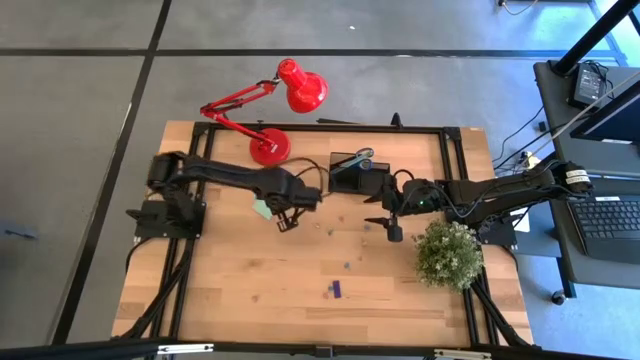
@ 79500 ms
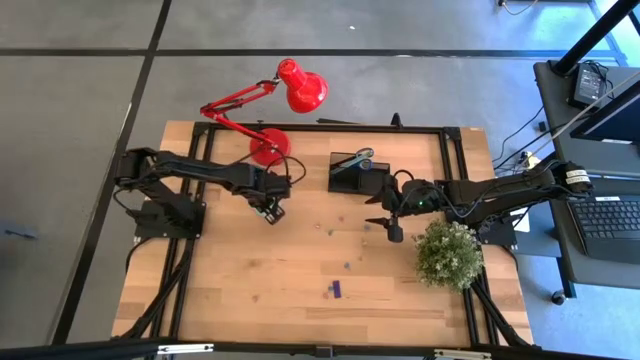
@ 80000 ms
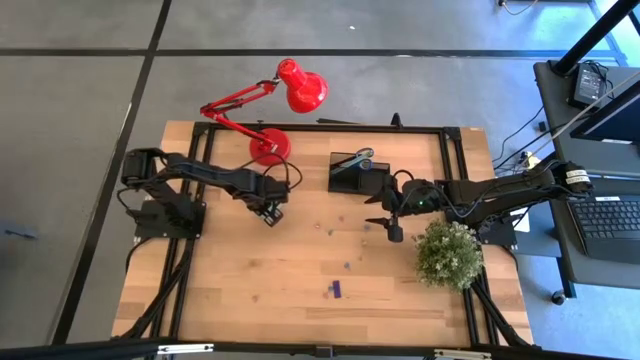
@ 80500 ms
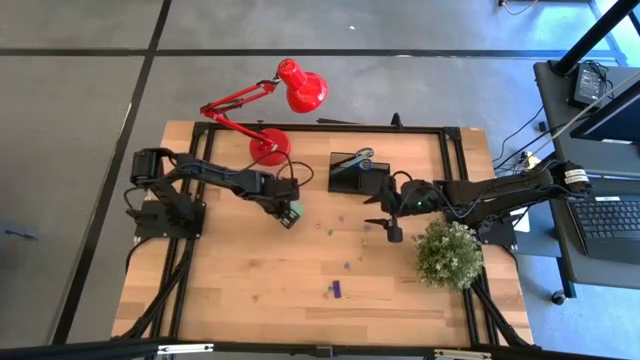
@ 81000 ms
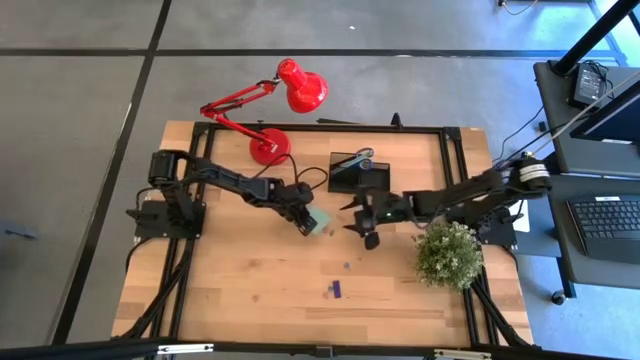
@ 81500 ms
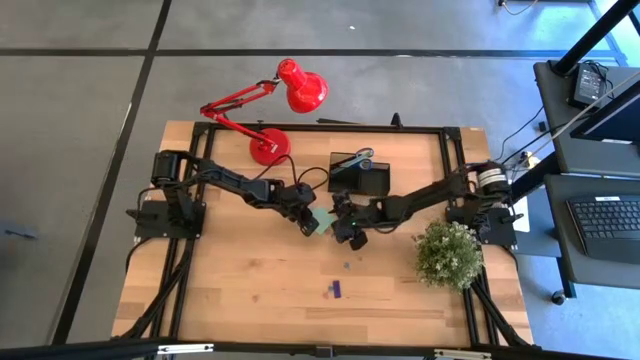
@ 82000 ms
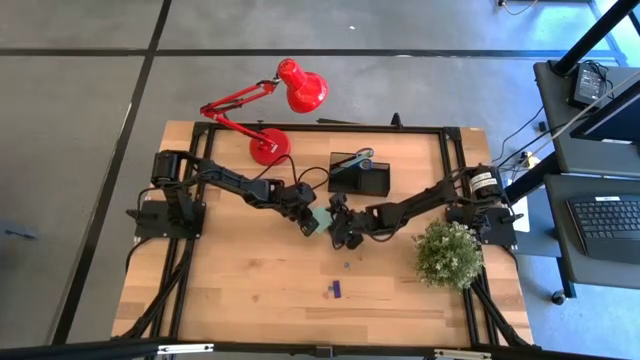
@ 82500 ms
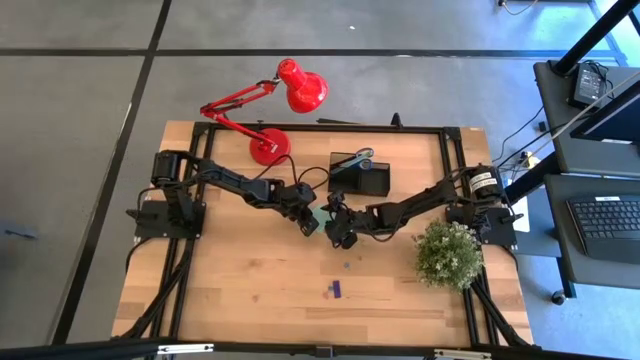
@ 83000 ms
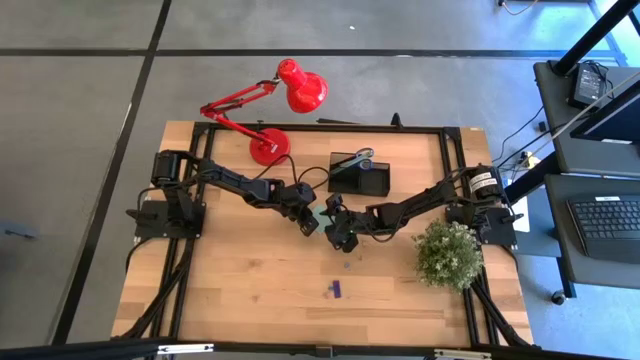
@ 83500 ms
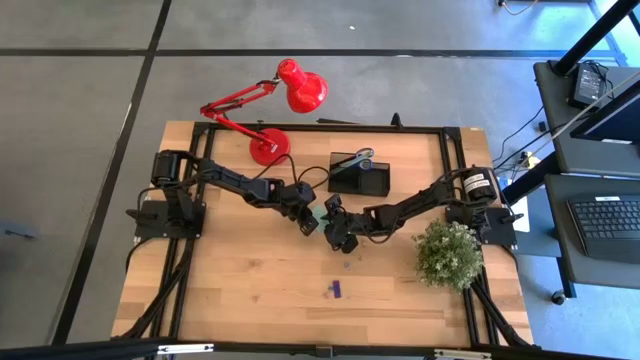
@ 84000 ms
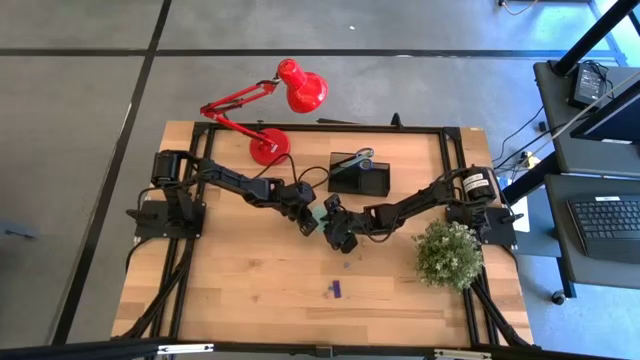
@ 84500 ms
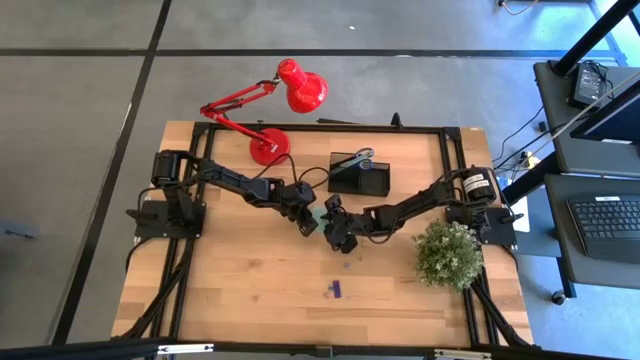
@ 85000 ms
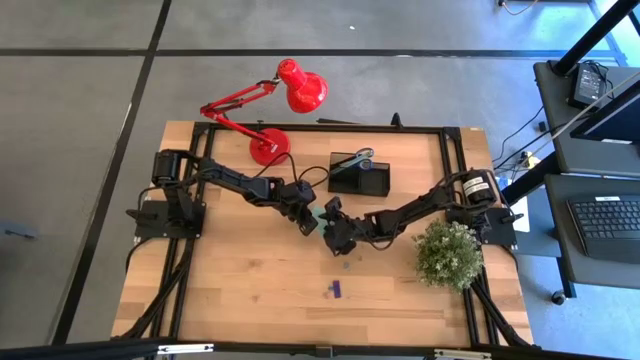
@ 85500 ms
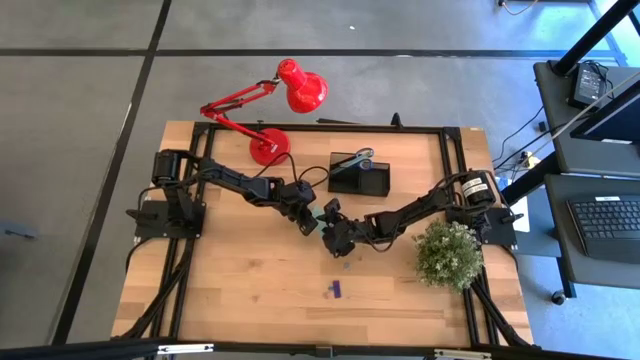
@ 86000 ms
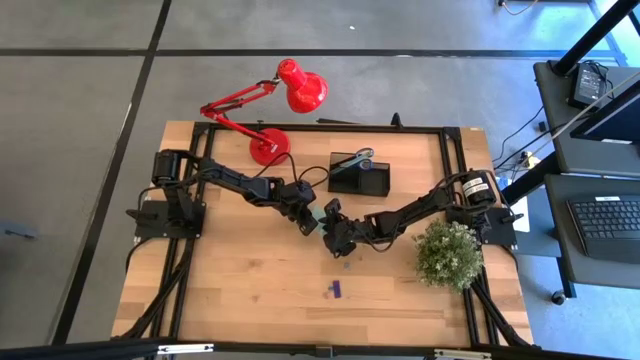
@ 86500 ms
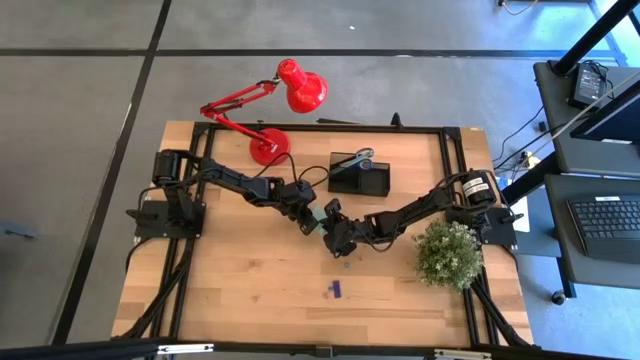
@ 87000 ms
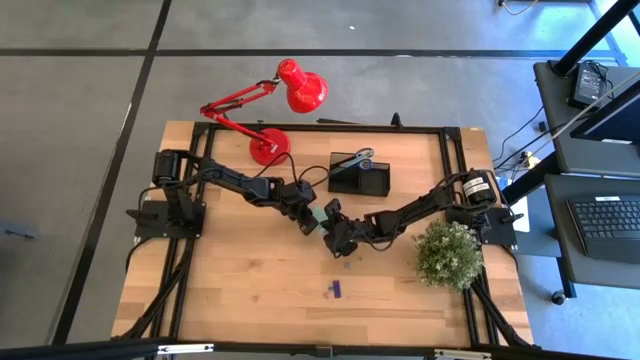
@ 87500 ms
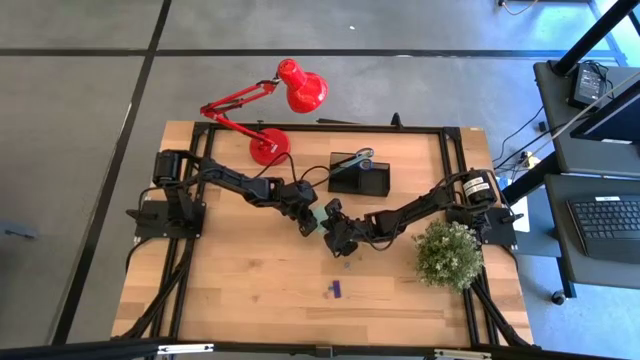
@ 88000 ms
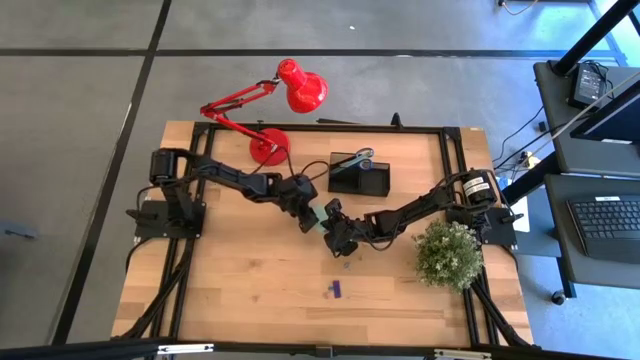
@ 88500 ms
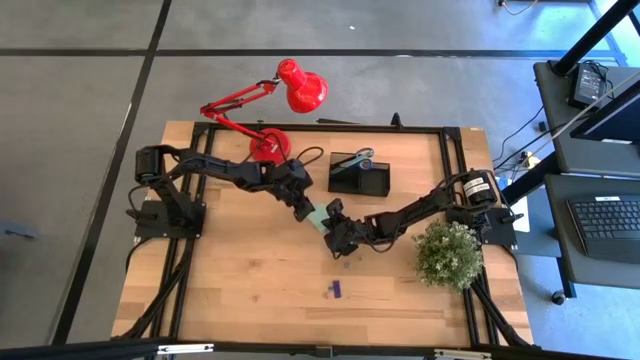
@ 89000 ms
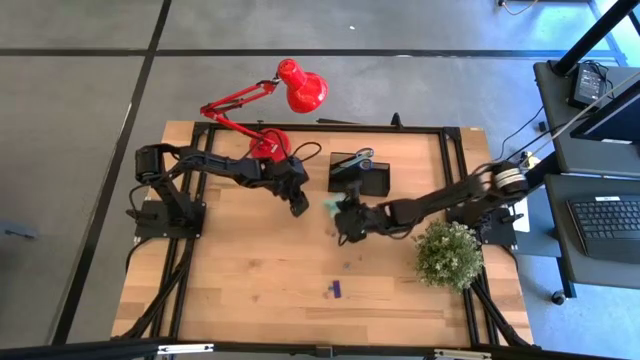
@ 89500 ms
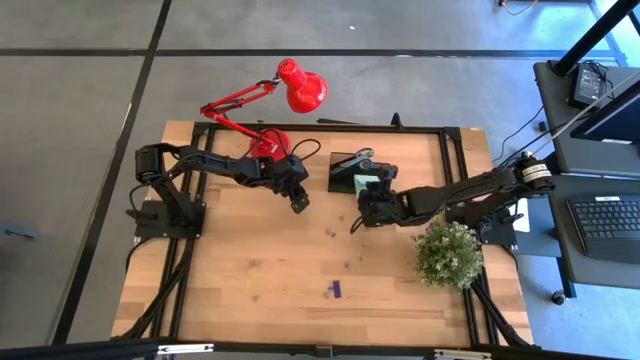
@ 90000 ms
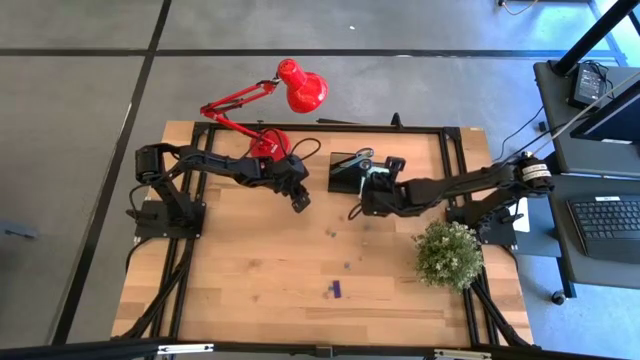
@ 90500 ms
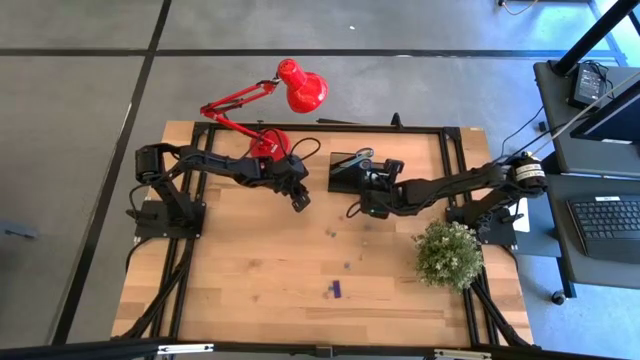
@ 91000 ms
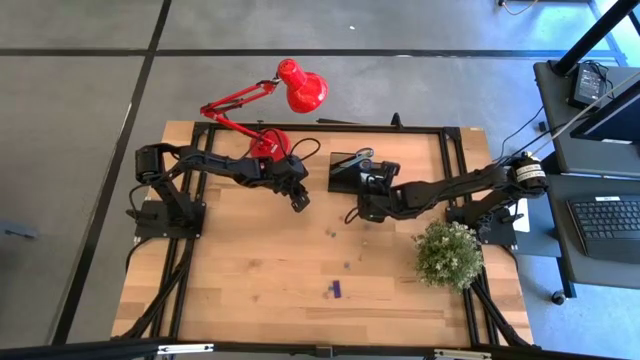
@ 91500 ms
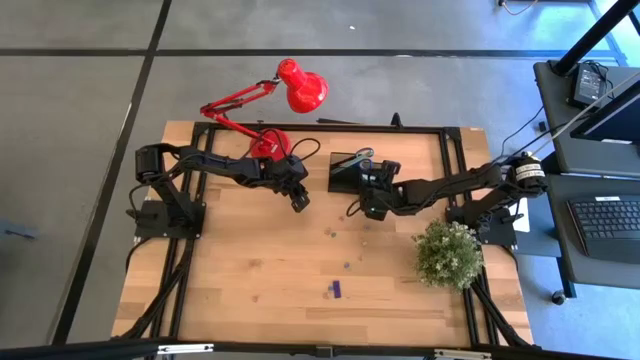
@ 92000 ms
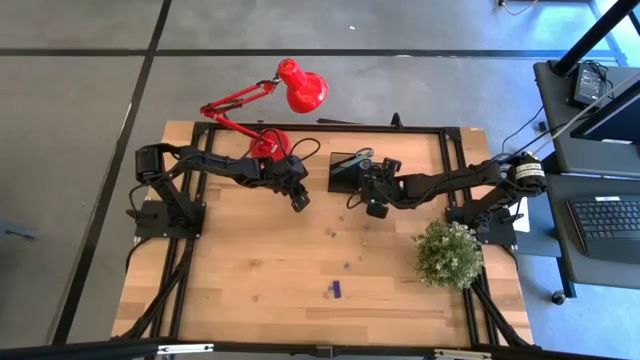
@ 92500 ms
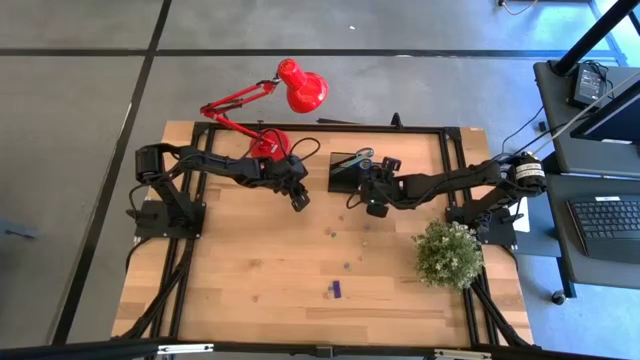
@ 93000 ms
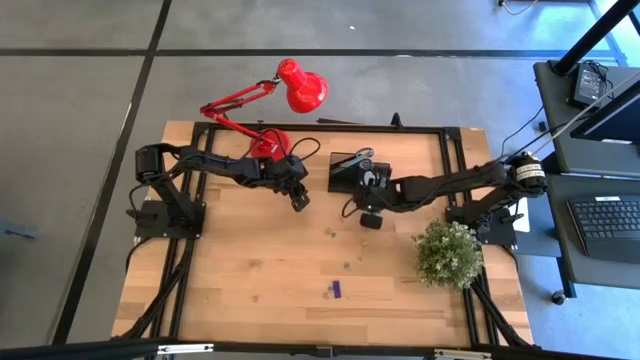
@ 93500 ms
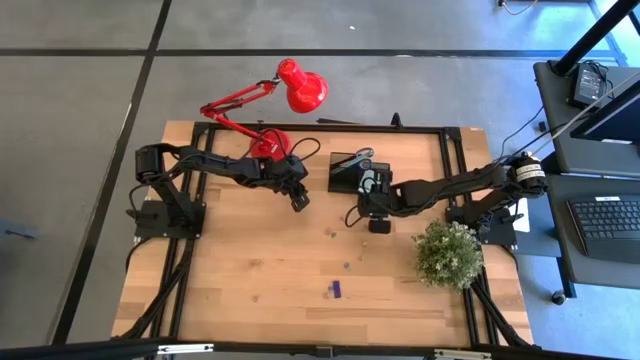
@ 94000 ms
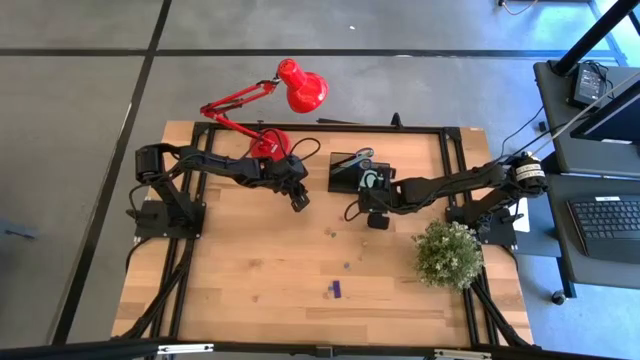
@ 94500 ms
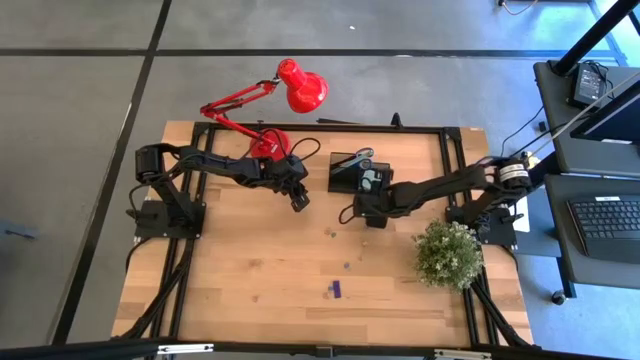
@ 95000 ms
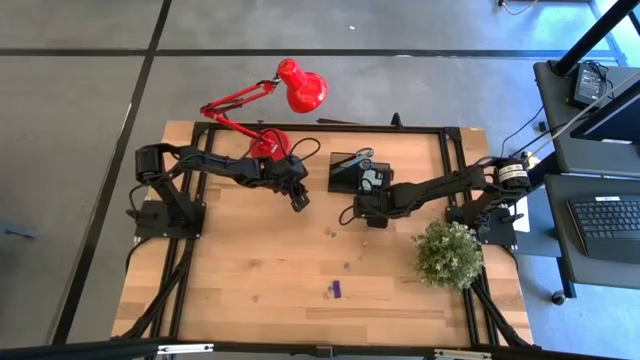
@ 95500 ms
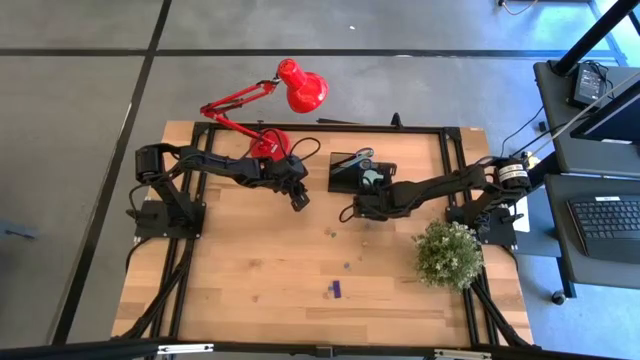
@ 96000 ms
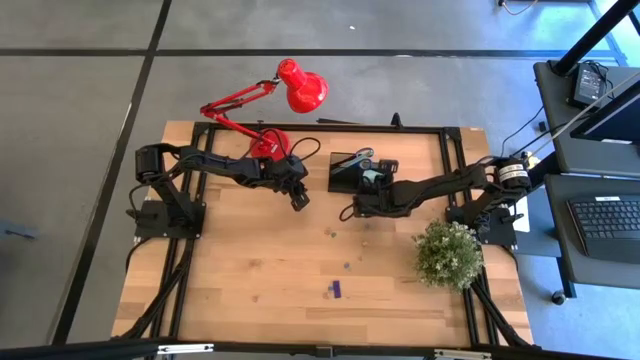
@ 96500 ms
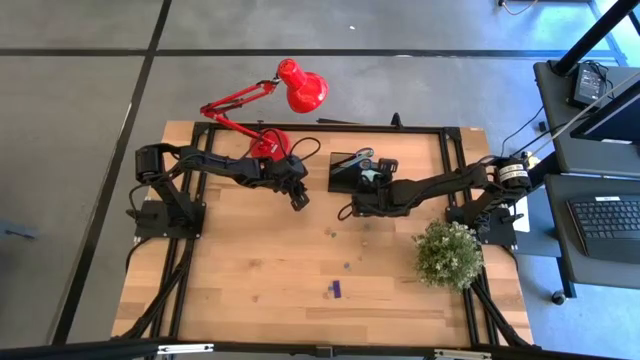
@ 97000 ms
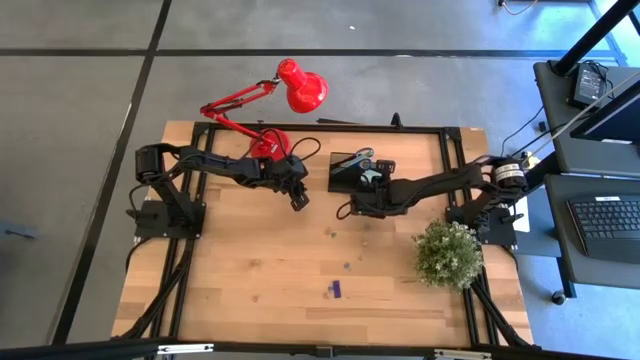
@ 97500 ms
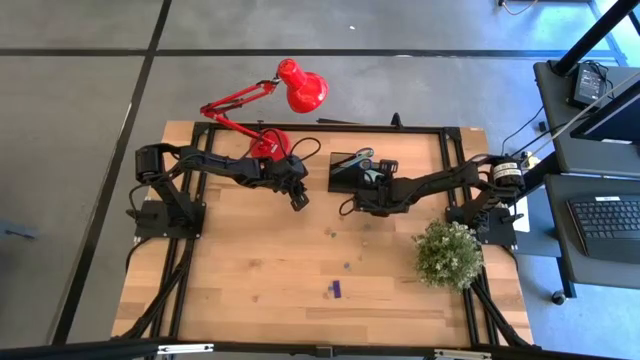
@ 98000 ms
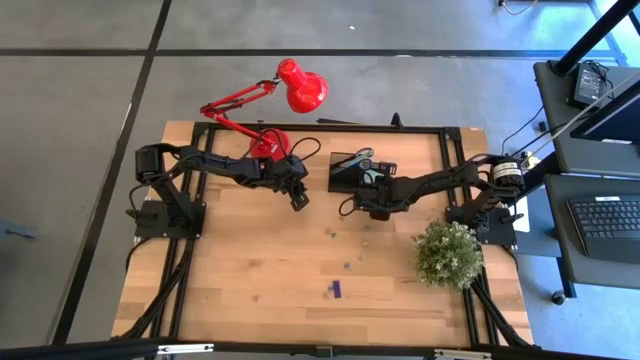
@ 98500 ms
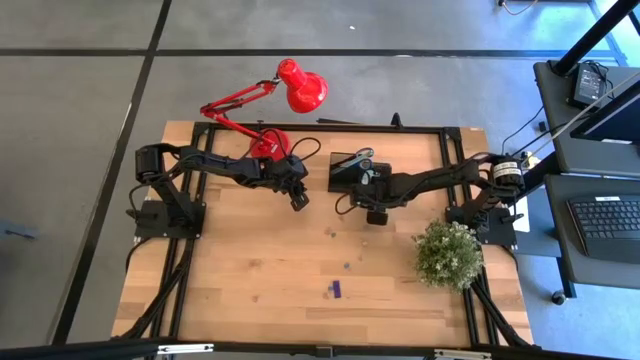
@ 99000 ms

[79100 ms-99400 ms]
Task: Pick and place office supplies into organizer
Put the blue sticky notes into the black desk organizer
